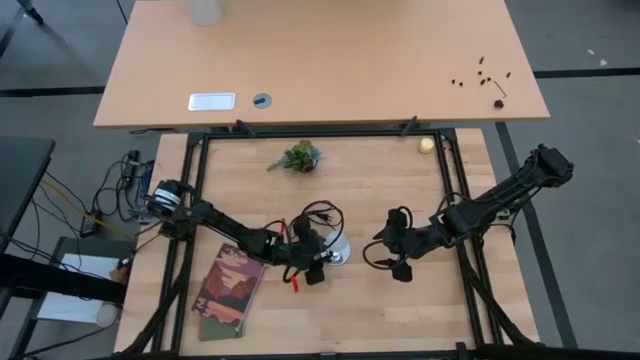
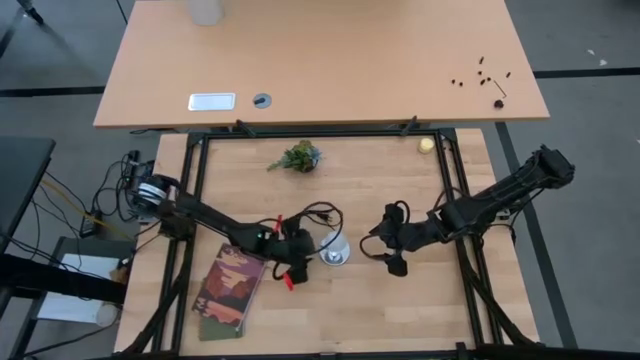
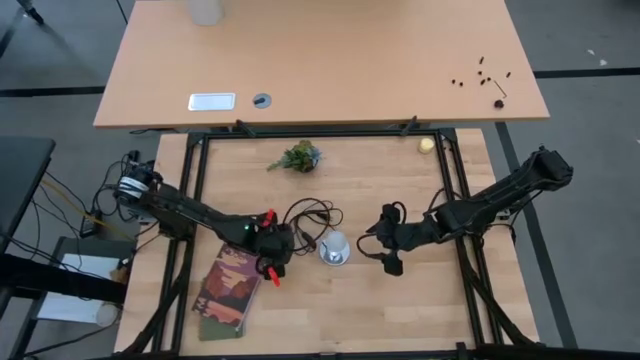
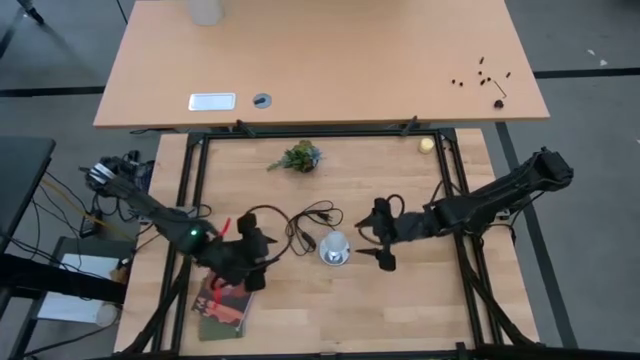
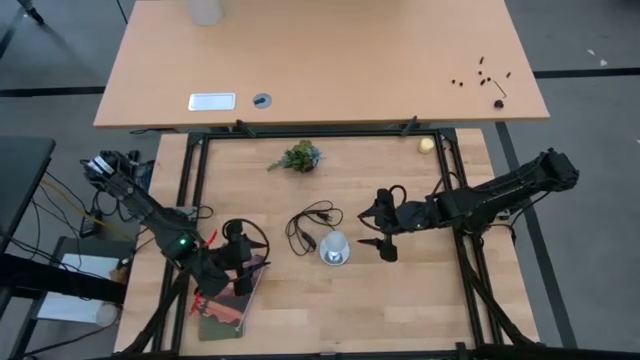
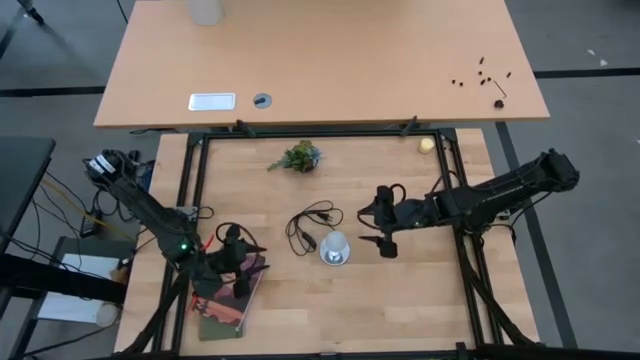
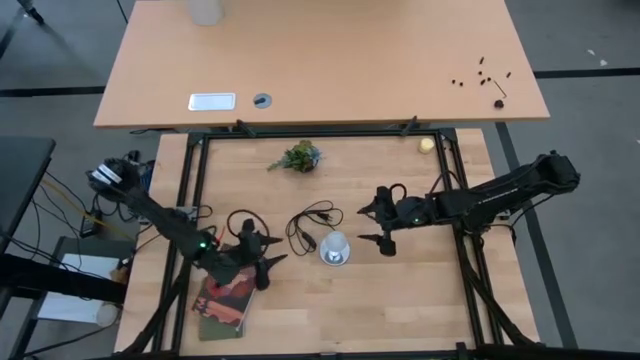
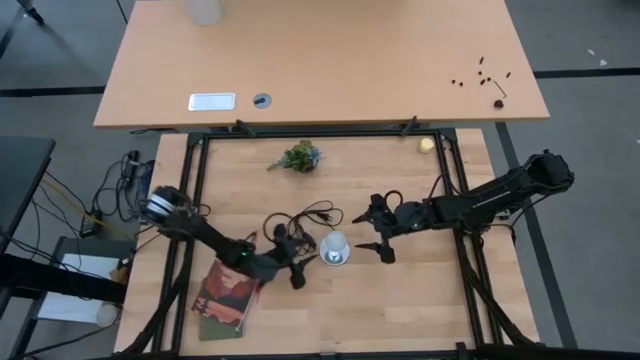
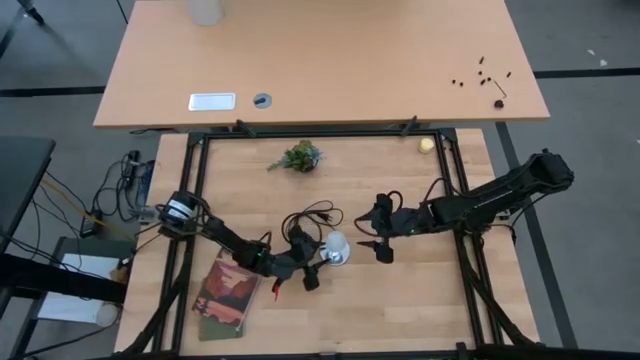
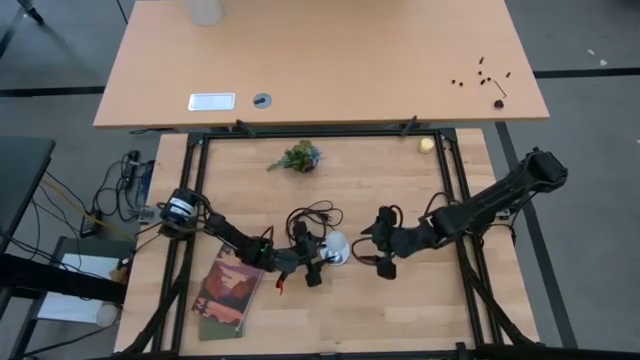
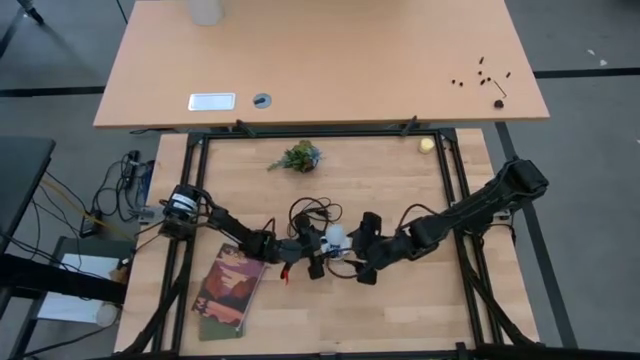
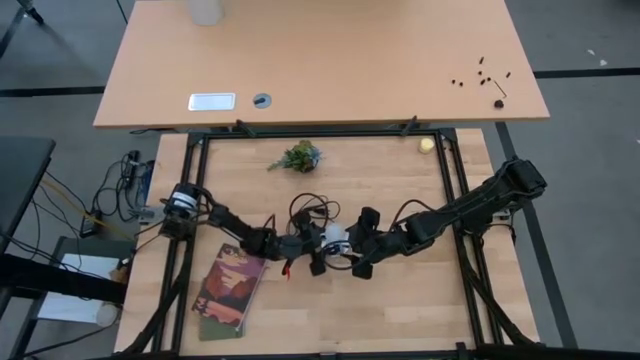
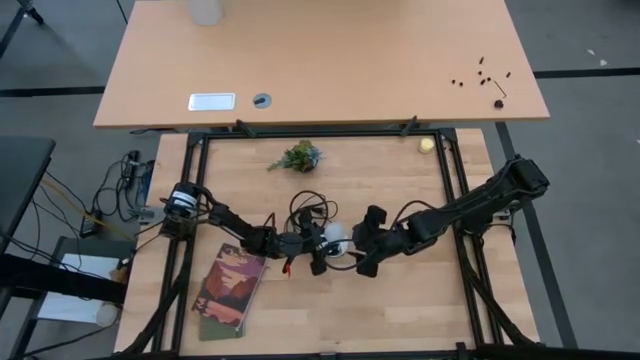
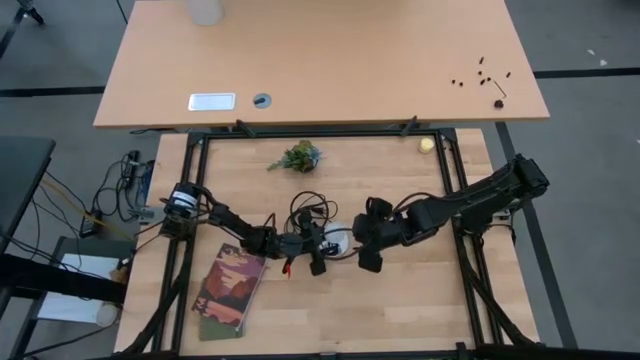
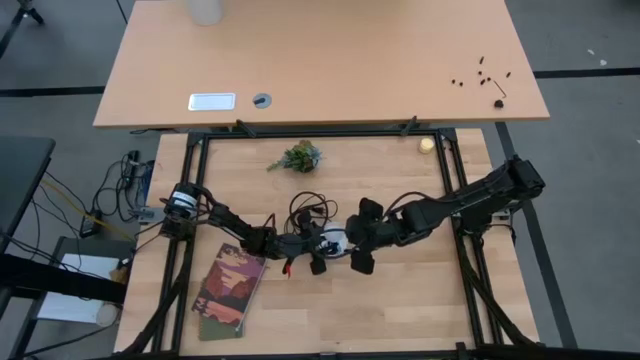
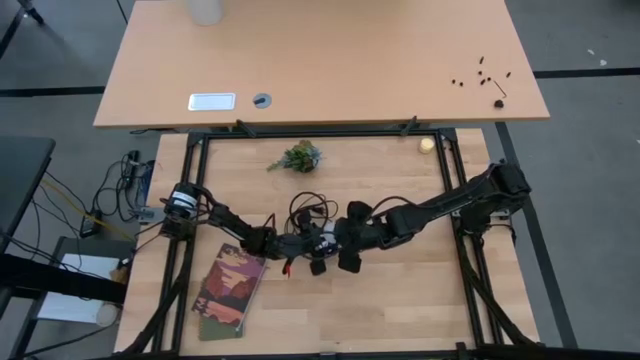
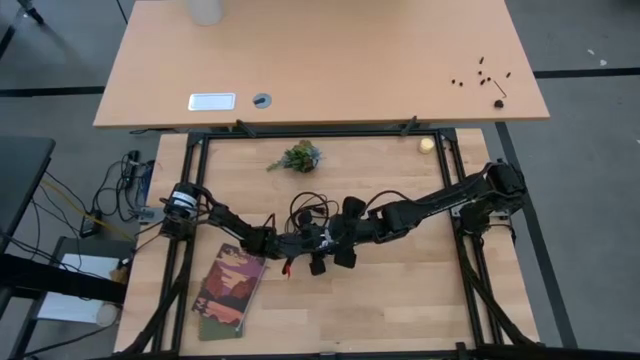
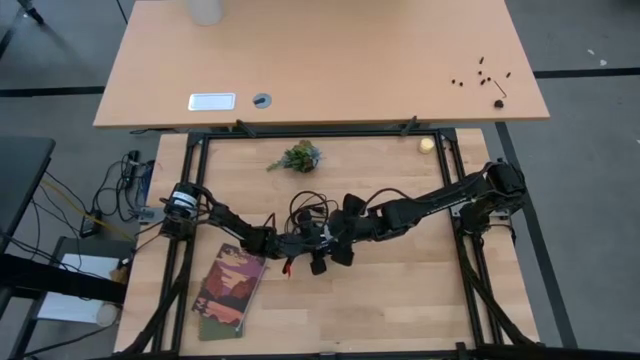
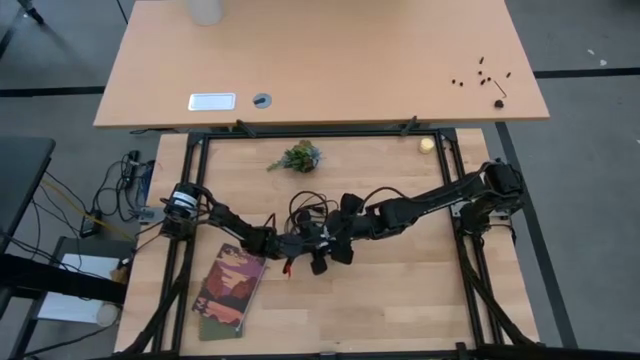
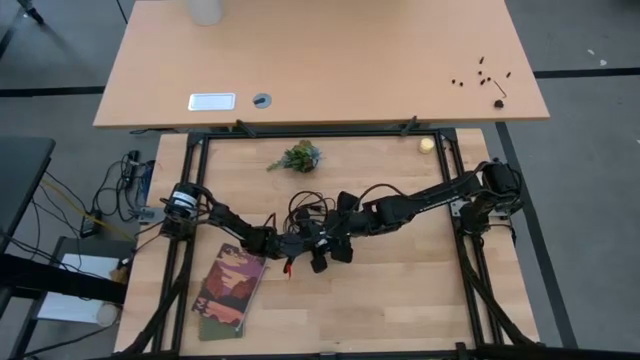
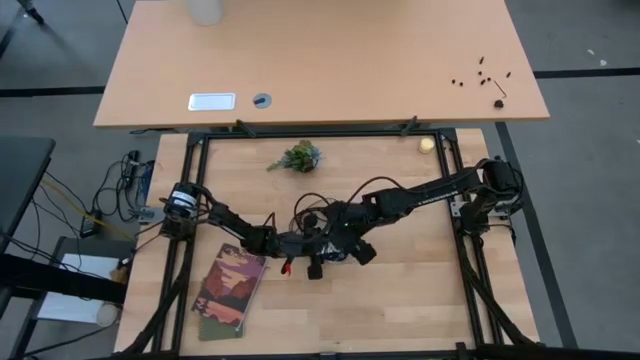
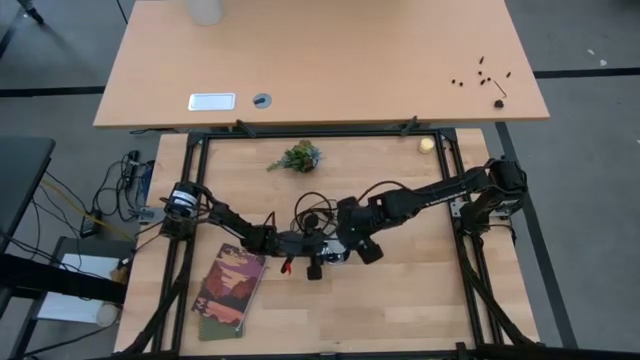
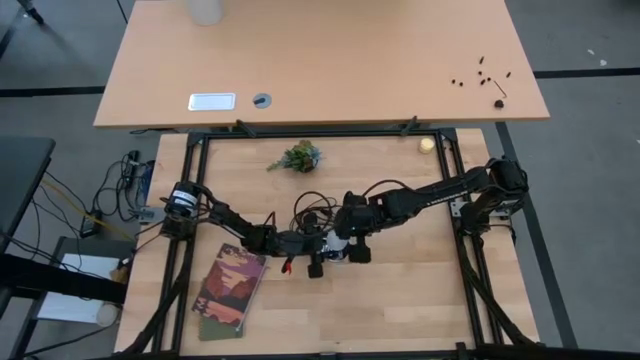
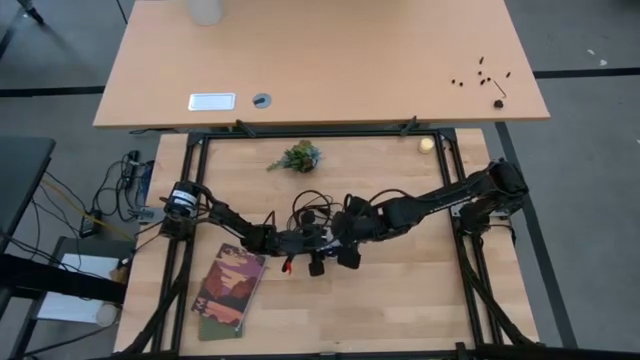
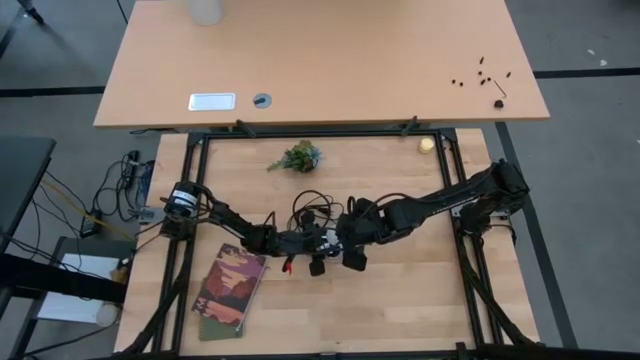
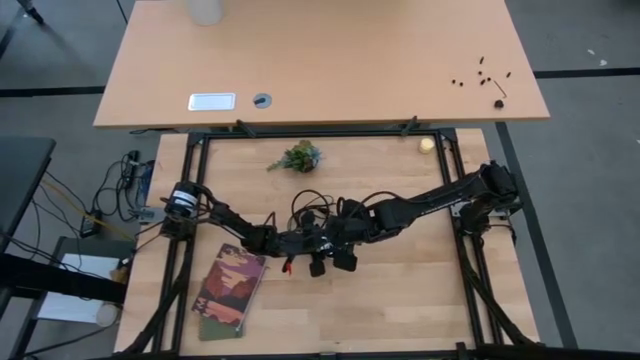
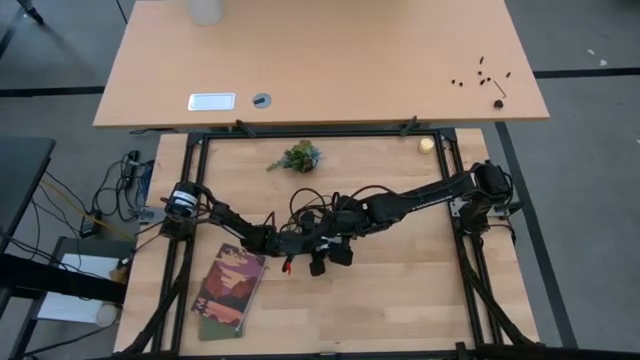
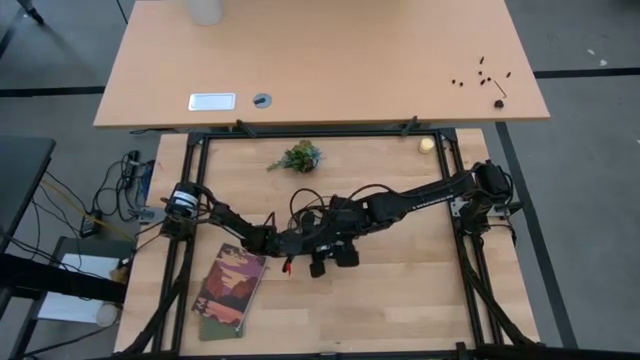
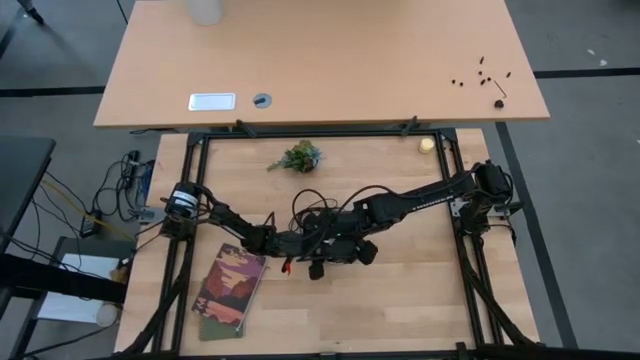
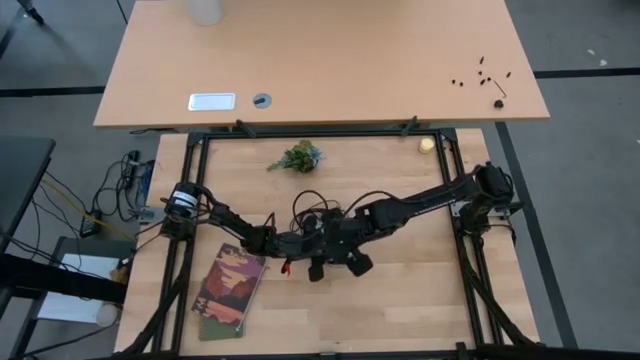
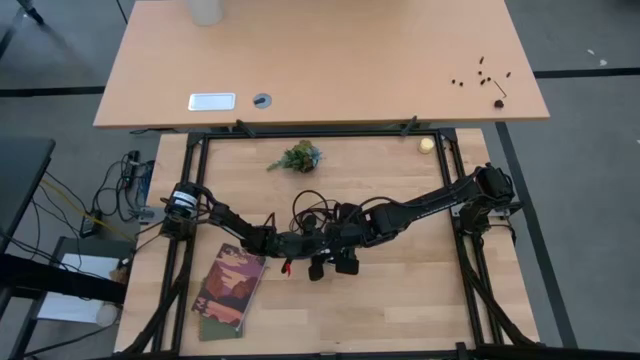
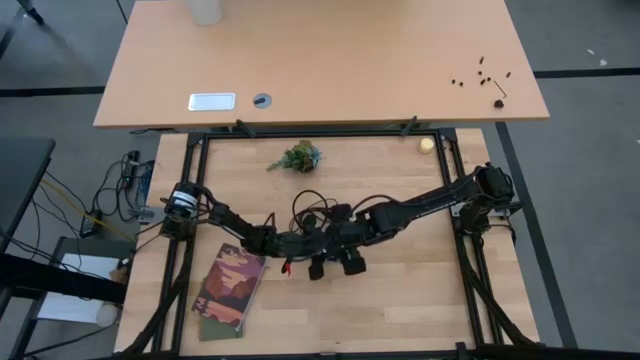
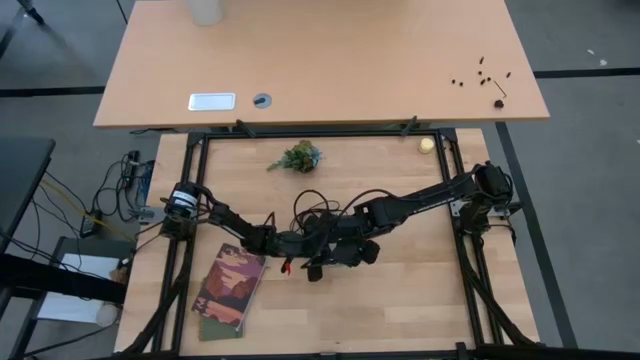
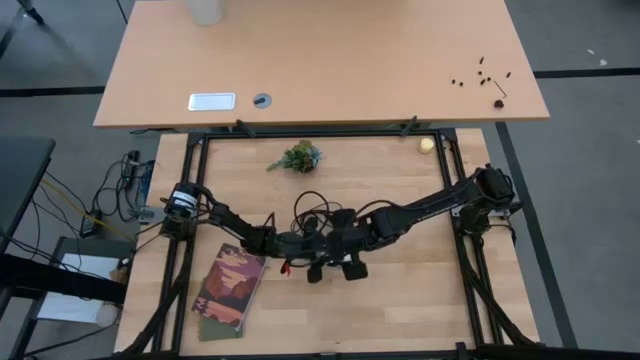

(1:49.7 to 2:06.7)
Task: Screw lightbulb
Remove the white lightbulb from the lamp socket

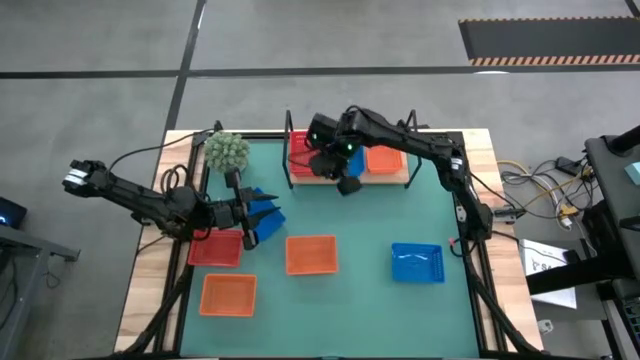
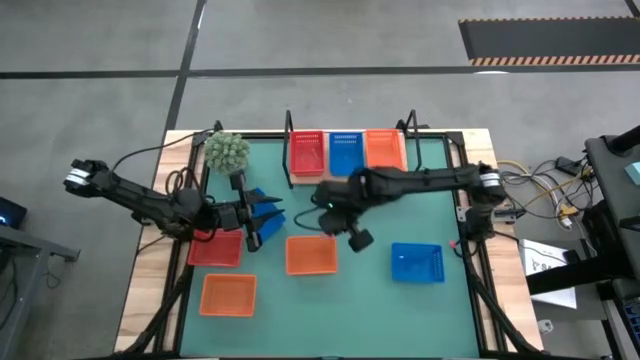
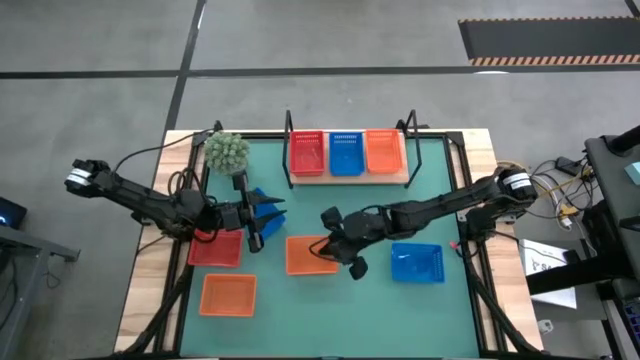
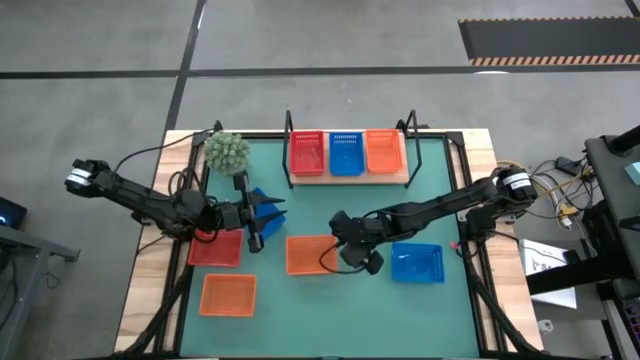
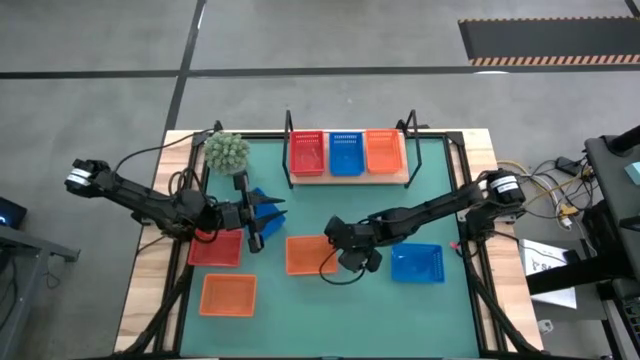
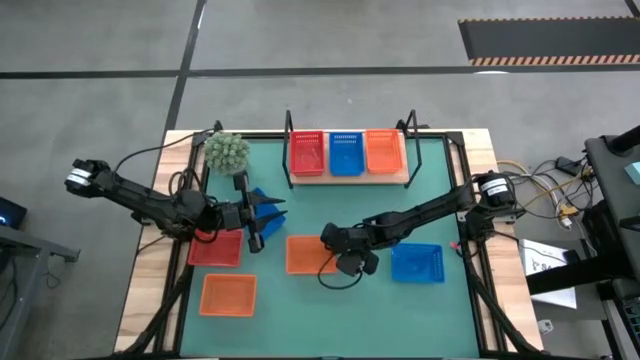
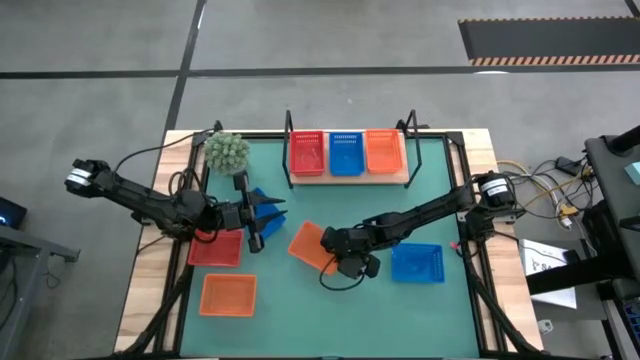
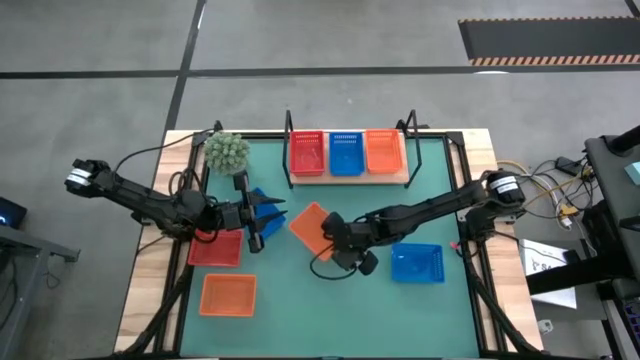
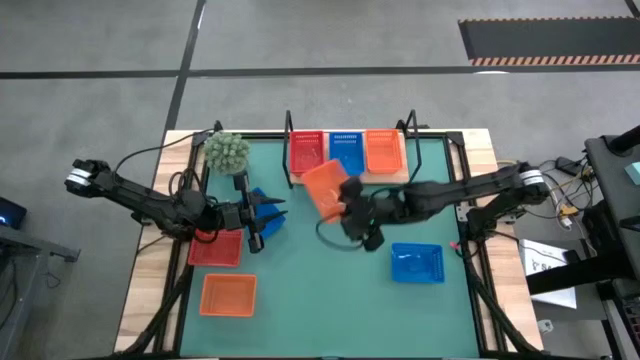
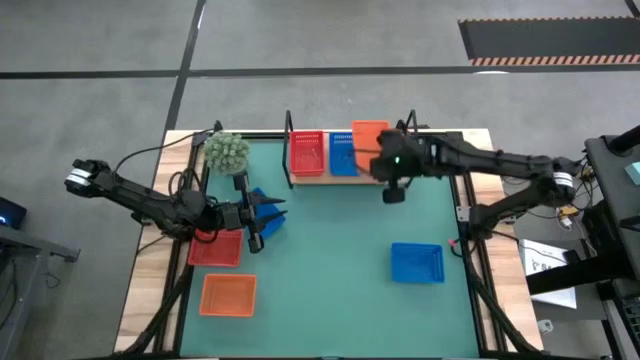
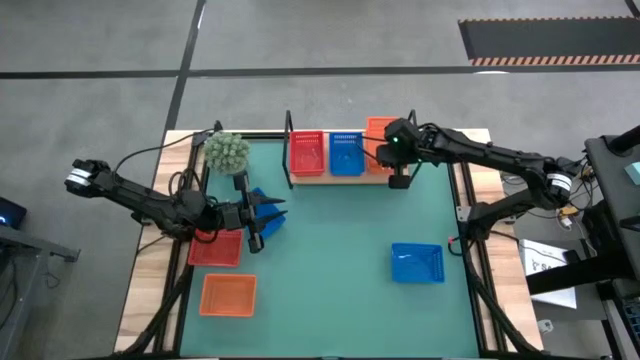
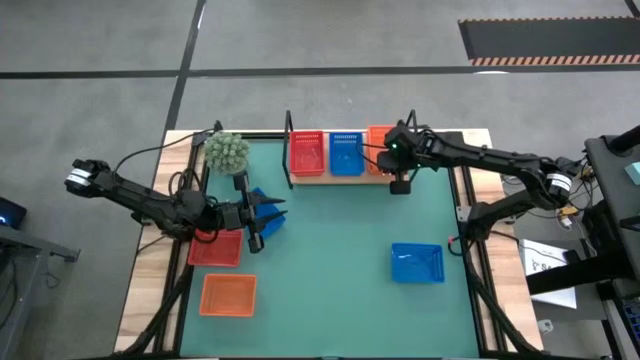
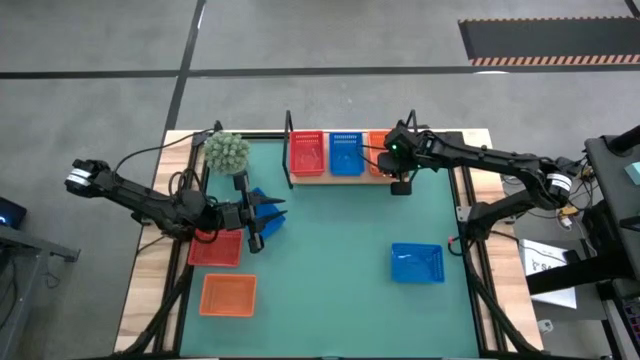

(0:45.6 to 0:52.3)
Task: Stack baskets on shelf by color
Stack the right orange bin on top of the orange bin on the shelf
